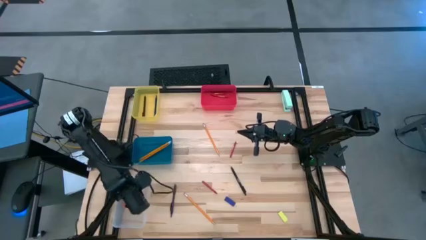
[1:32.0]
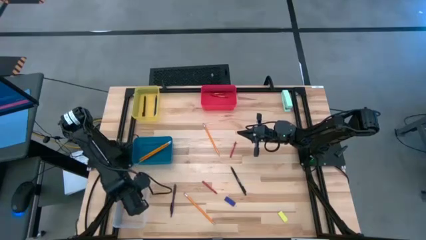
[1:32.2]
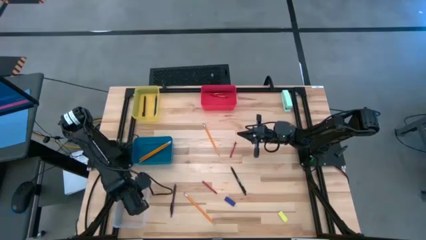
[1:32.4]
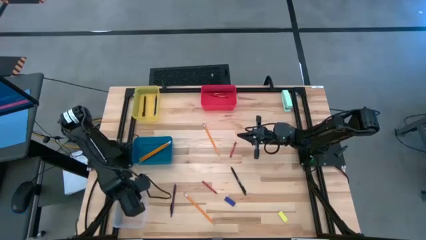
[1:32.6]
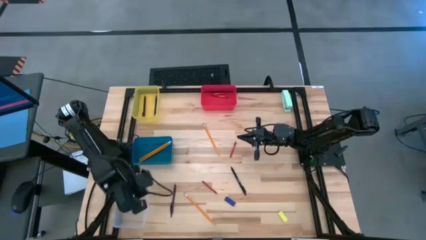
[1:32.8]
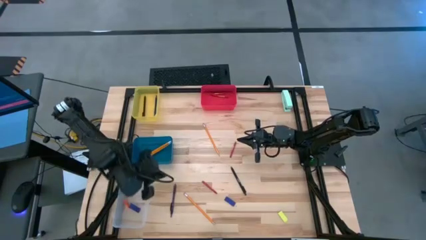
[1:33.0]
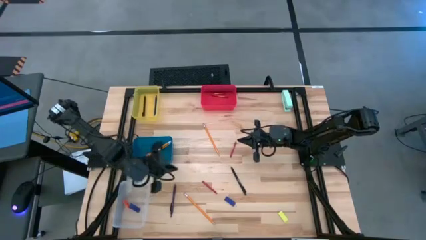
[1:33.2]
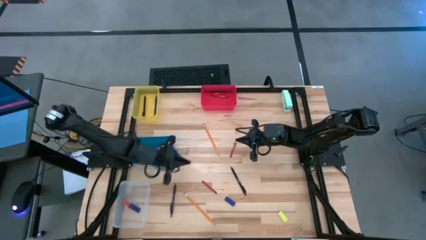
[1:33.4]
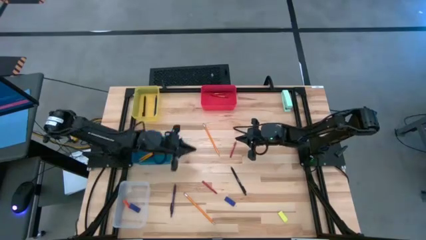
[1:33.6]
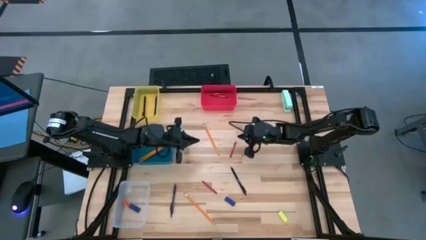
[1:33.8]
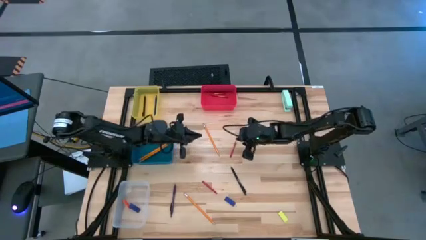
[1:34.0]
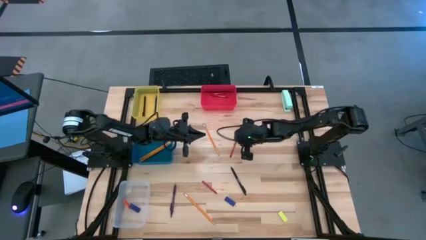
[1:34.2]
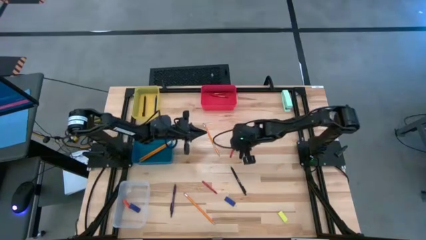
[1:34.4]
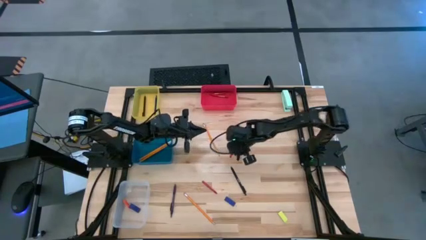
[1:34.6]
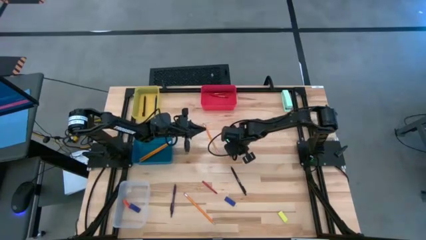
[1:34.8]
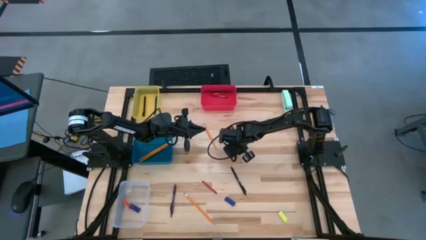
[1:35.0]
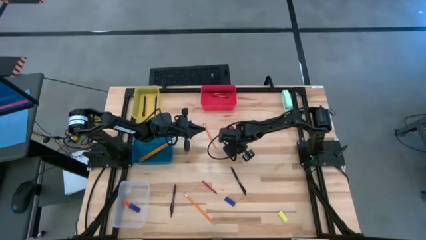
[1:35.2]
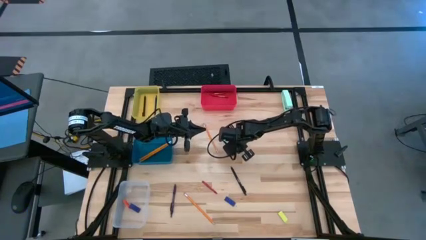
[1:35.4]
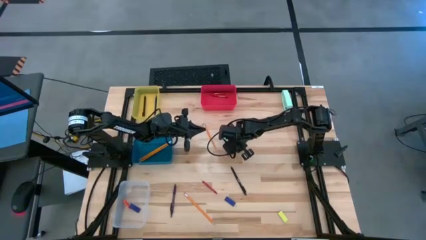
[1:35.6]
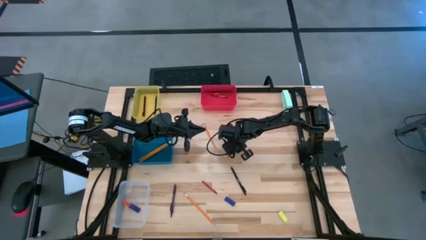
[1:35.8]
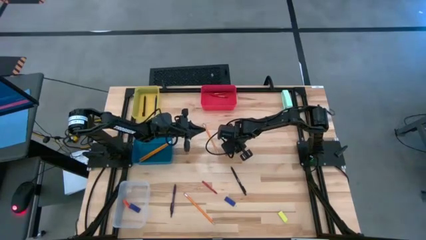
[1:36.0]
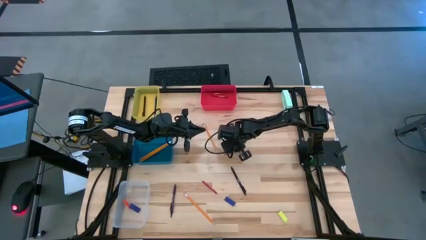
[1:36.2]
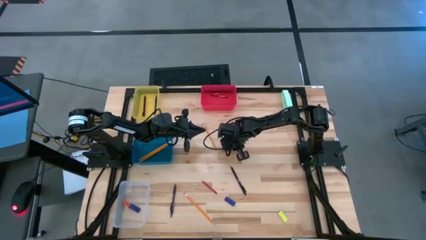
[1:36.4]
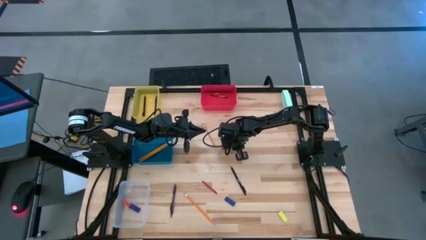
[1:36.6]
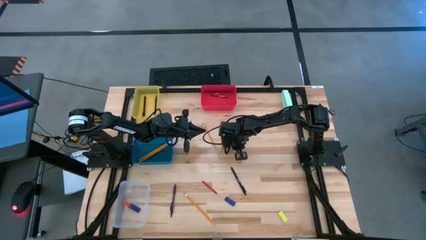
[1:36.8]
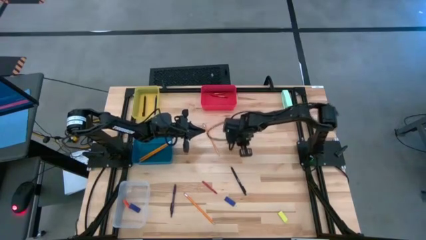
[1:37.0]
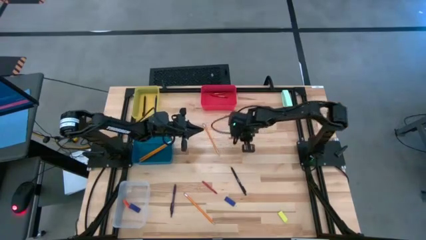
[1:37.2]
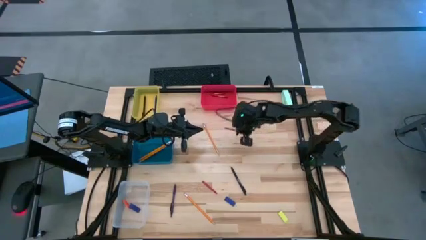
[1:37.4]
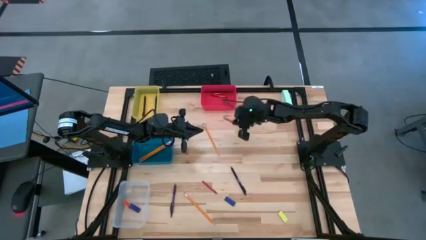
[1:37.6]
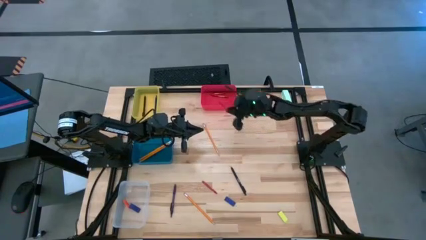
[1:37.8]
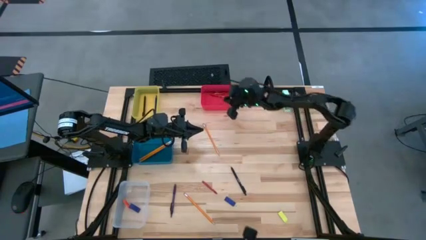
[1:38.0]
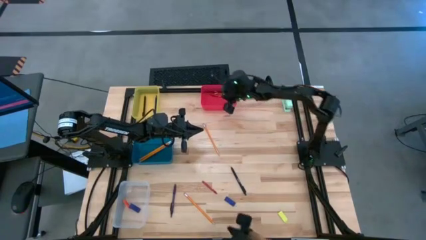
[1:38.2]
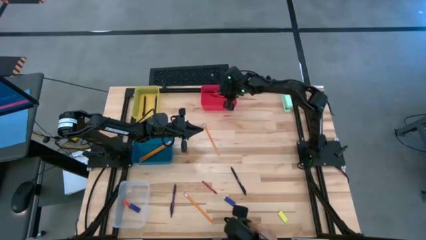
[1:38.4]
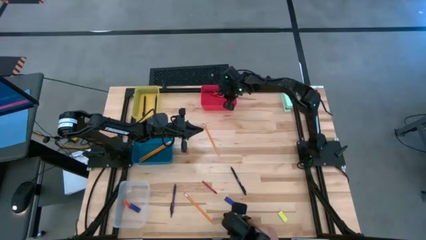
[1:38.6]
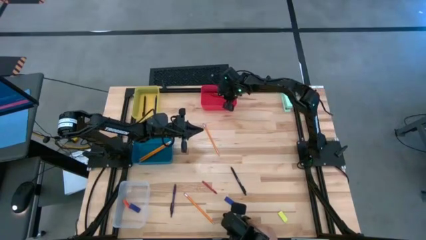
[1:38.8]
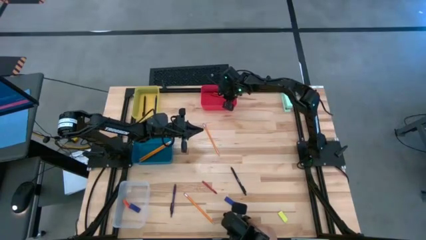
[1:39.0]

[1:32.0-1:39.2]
Task: Sort crayons/erasers/pens/pencils in bins
Put the red crayon into the red bin

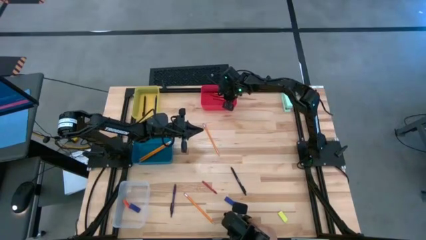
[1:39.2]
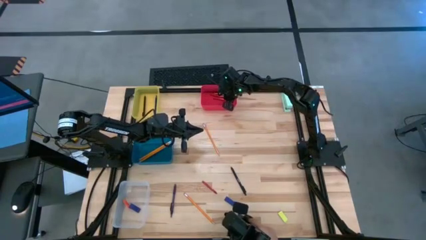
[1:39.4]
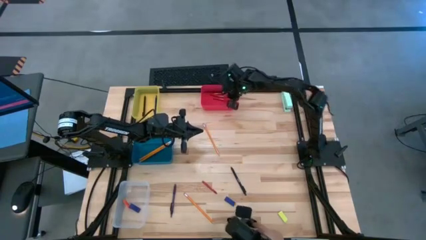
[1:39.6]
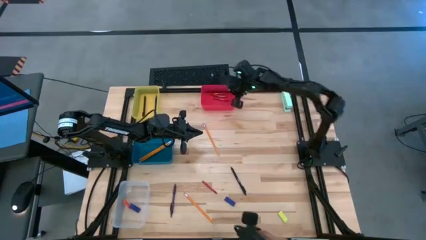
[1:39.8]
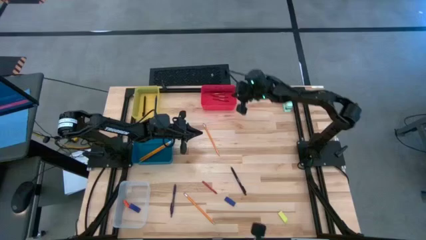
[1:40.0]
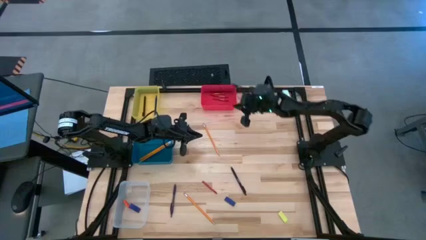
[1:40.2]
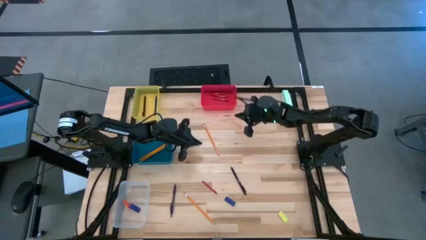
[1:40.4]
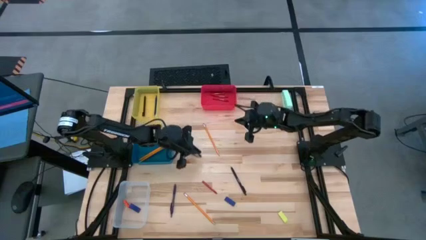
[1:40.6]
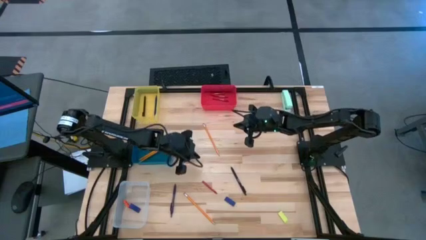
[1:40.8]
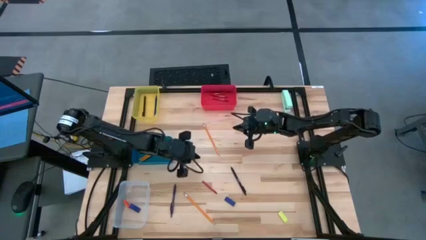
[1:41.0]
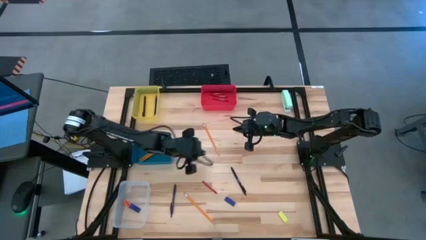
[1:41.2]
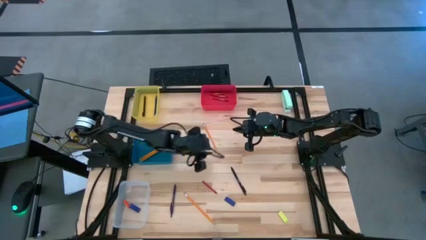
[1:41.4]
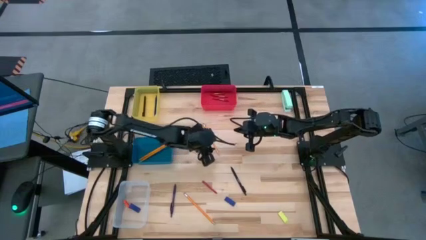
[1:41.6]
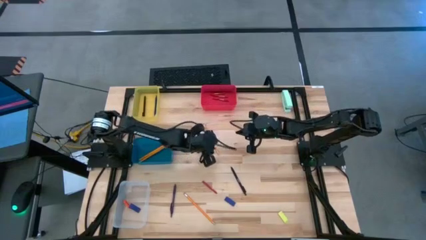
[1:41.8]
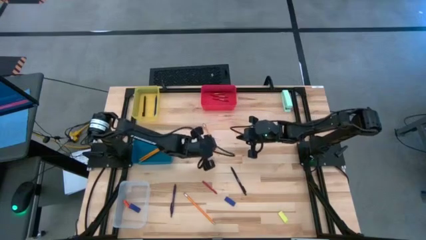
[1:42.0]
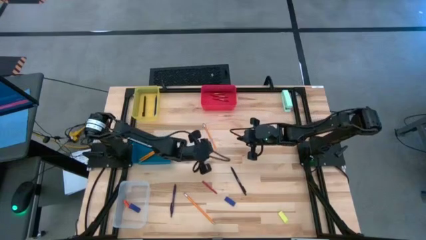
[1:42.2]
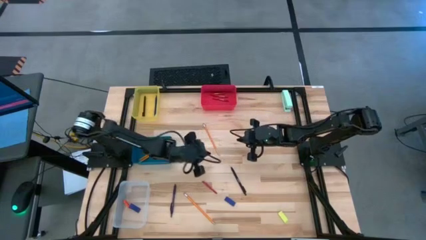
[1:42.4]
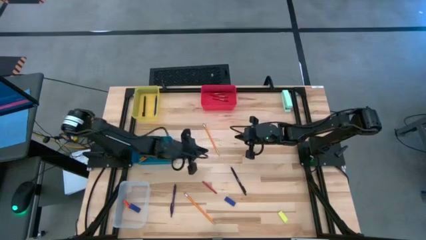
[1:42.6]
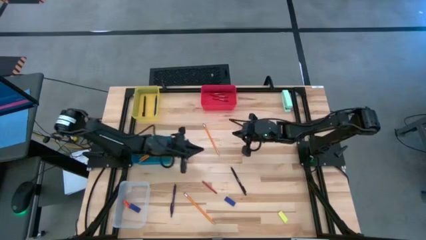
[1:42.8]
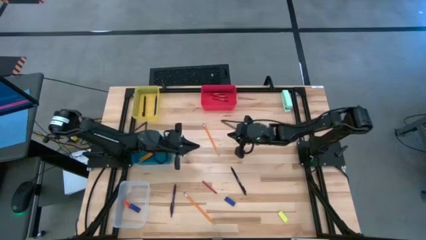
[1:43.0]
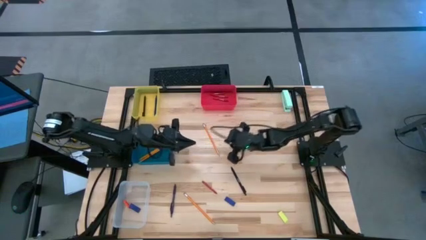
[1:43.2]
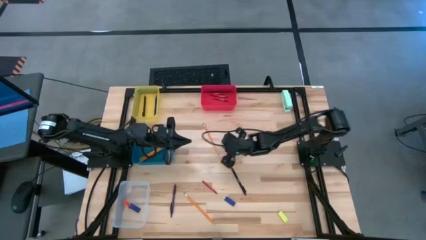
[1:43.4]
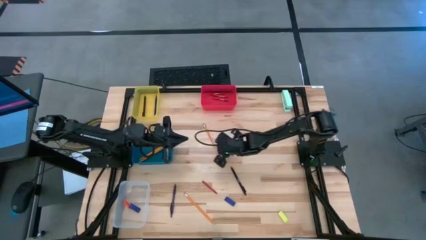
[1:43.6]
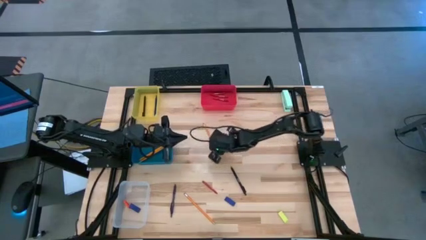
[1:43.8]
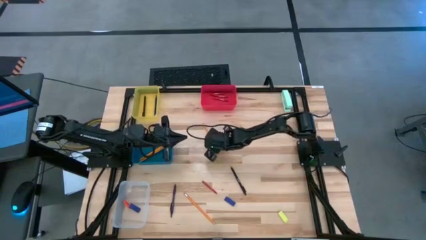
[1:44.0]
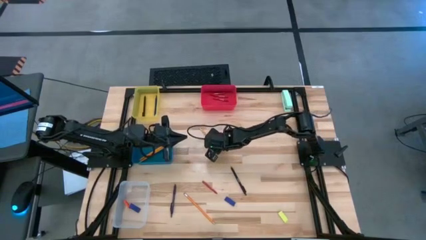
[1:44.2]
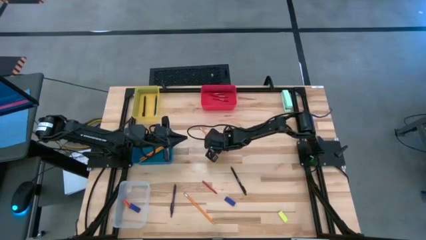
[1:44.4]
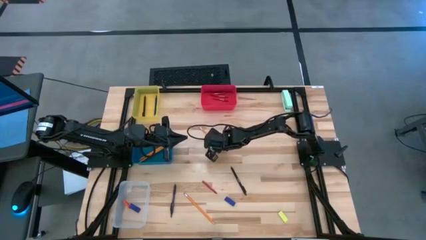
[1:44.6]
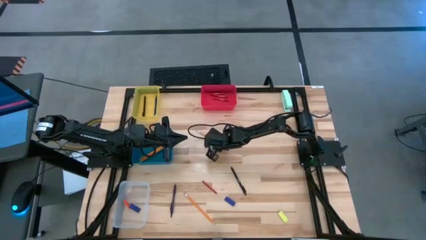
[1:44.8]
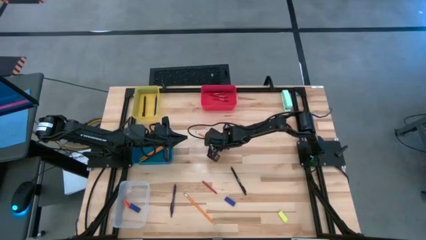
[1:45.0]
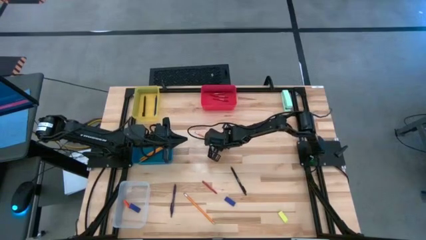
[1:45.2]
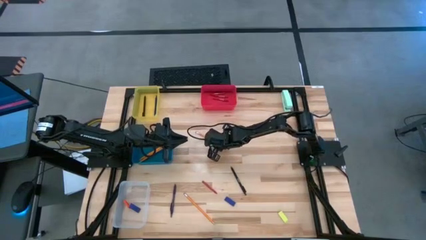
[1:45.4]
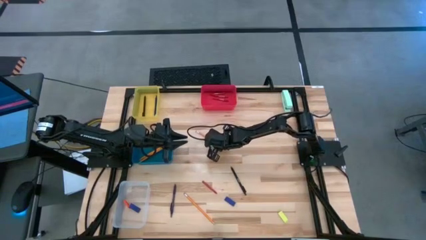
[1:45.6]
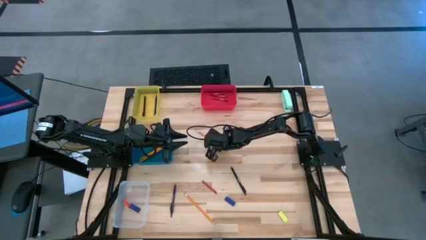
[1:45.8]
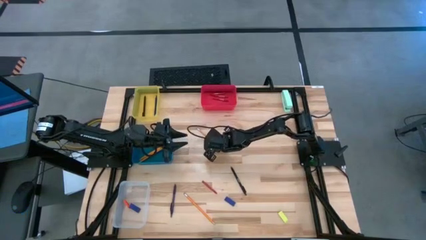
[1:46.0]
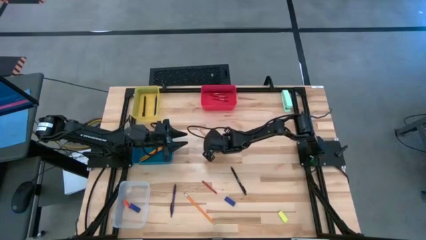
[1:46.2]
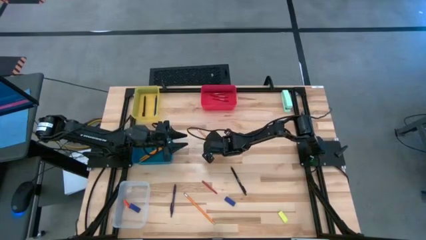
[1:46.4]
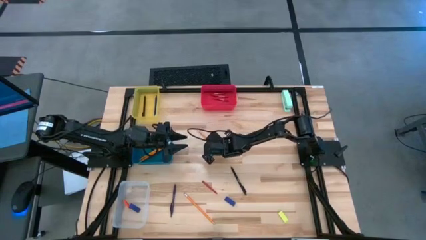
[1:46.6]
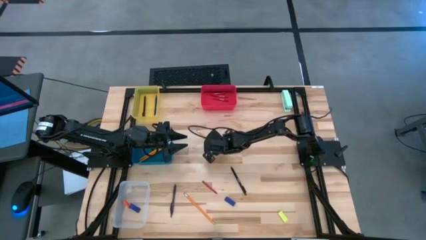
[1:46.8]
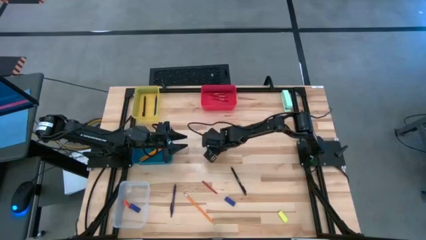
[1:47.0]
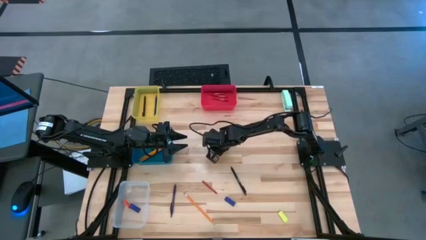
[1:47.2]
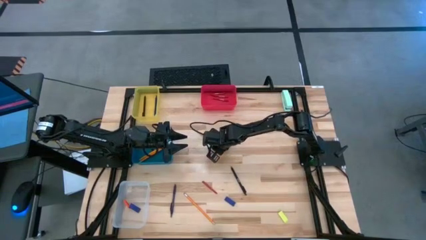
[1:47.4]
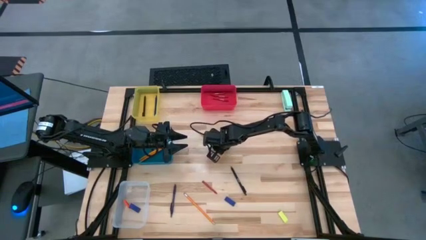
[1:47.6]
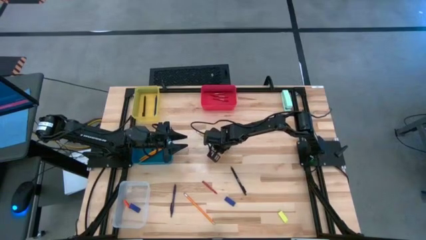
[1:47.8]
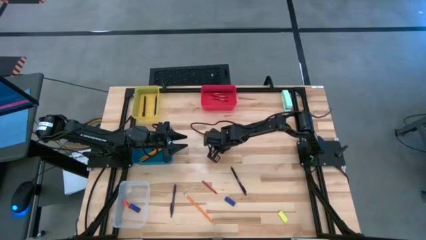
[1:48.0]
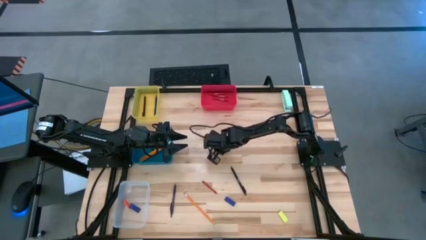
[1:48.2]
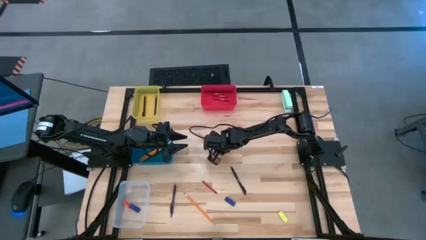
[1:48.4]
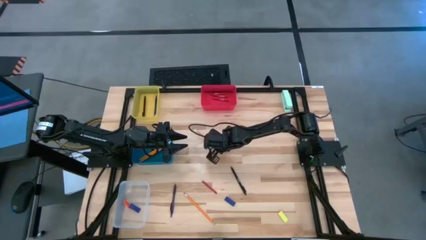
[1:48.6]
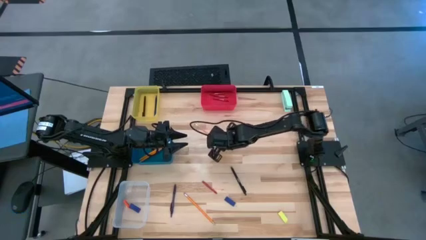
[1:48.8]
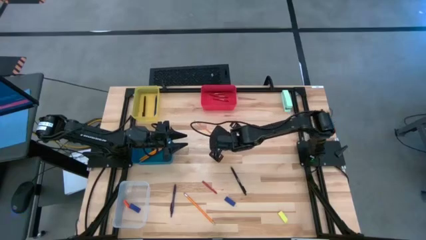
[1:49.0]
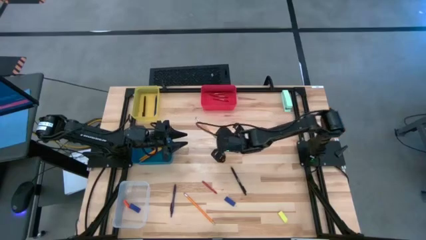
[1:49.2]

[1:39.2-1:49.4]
Put the yellow pencil into the blue bin
